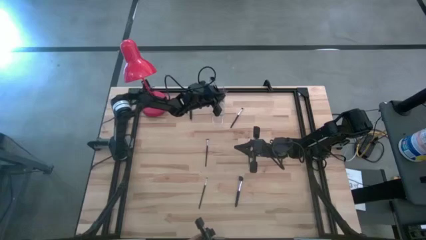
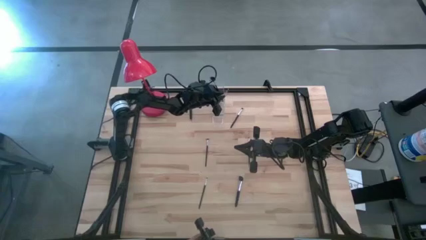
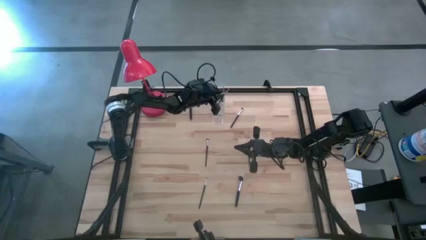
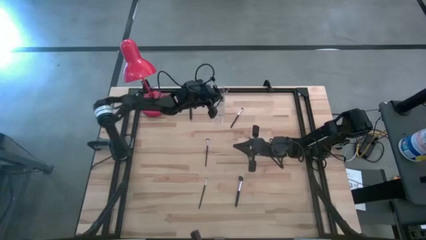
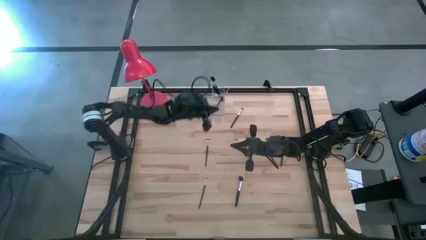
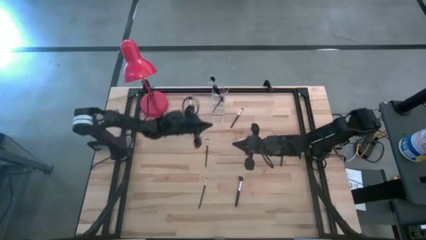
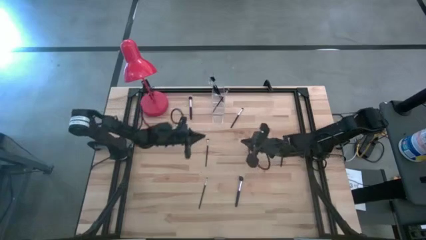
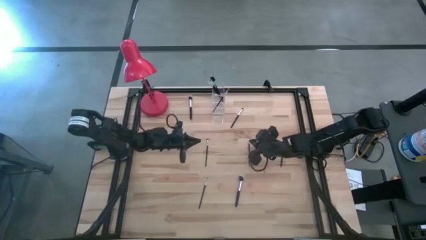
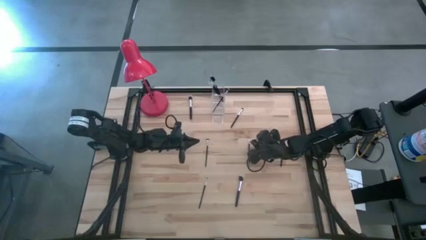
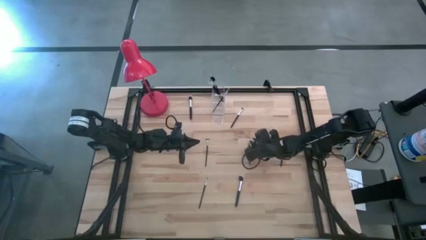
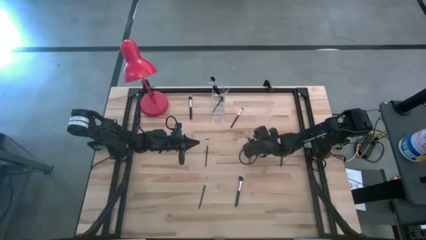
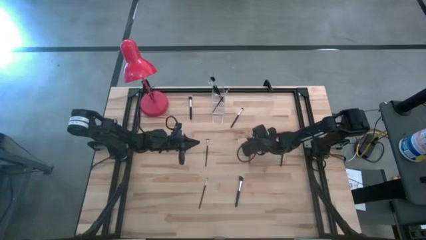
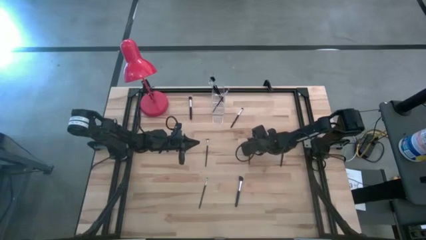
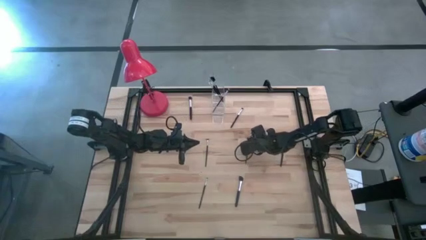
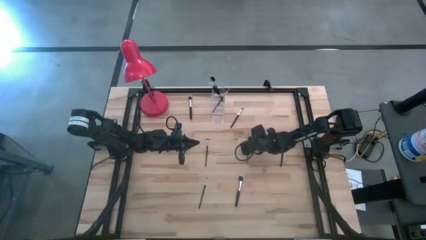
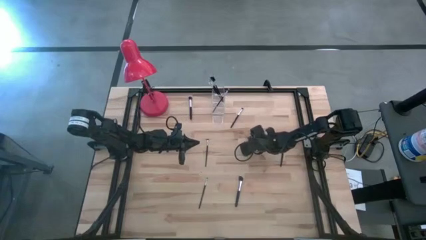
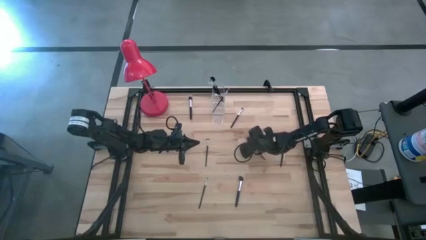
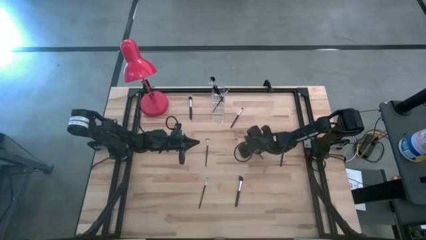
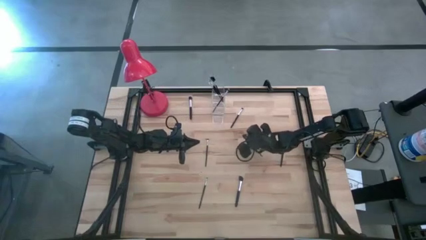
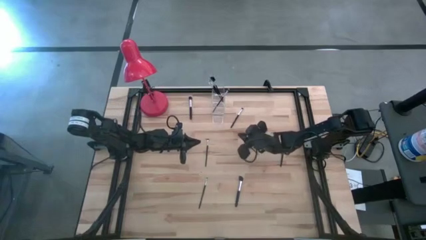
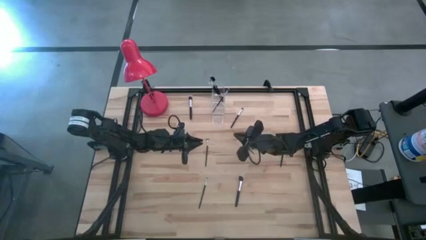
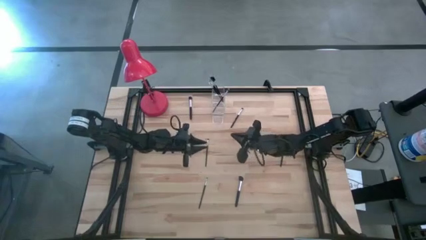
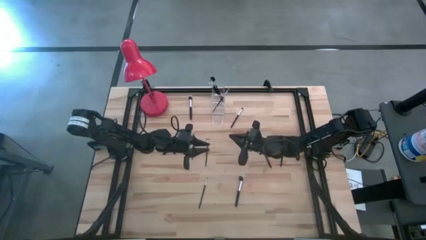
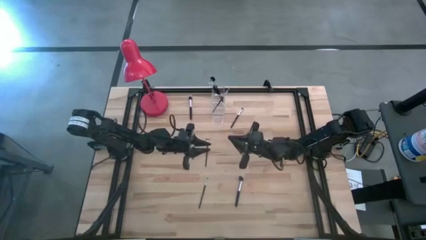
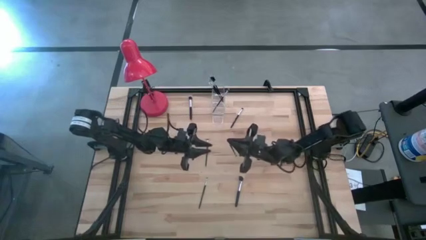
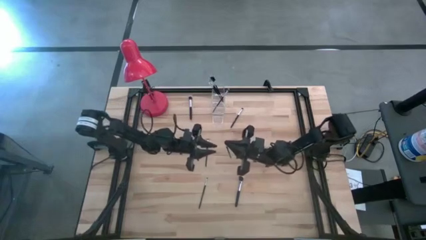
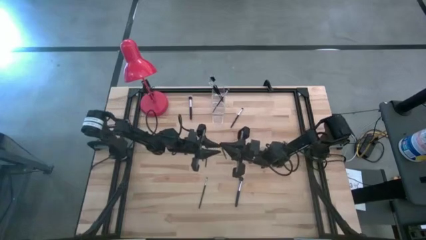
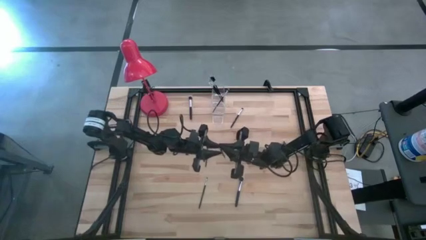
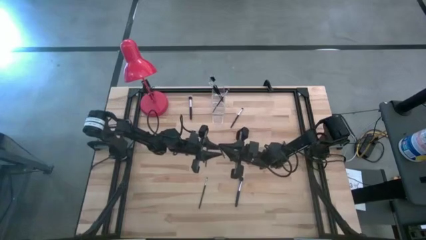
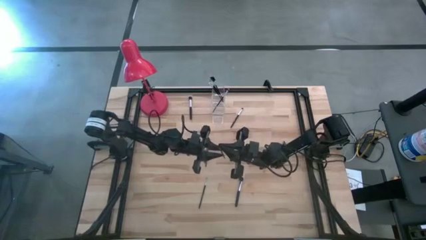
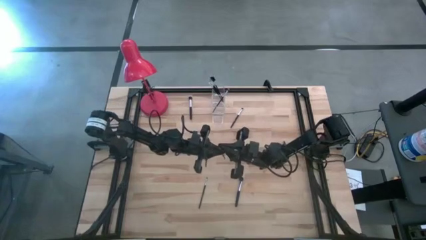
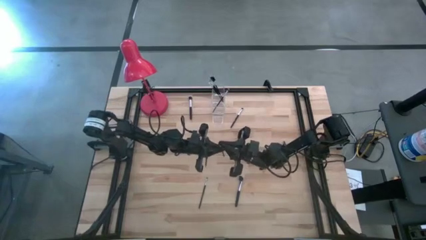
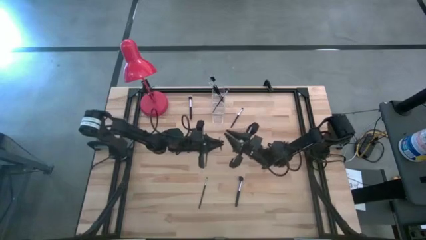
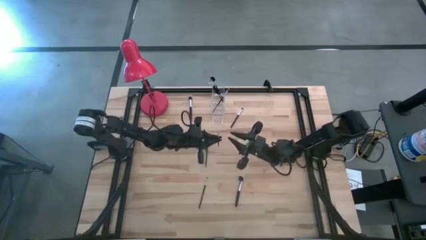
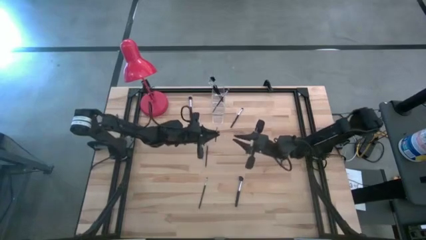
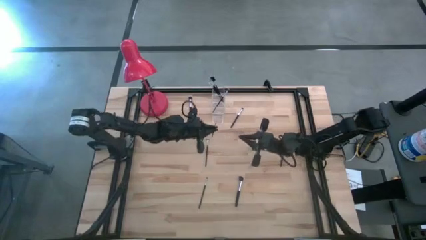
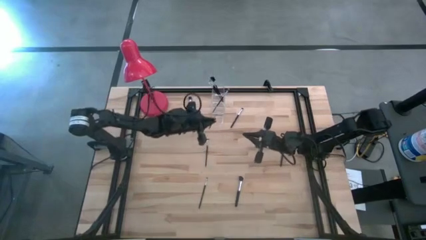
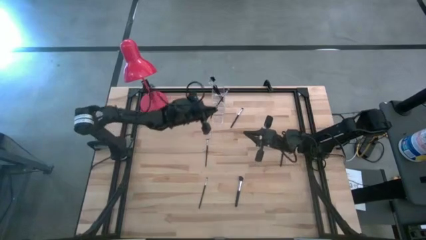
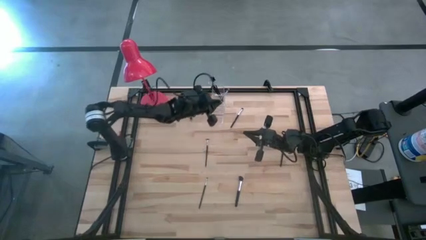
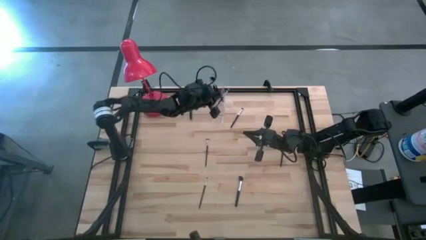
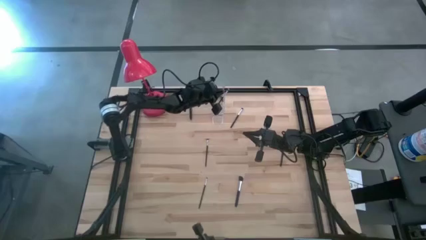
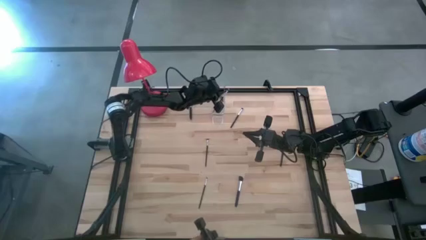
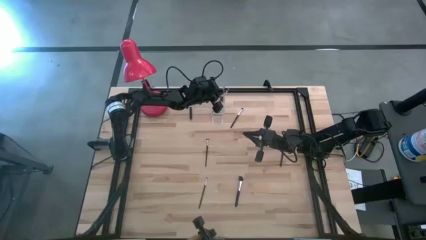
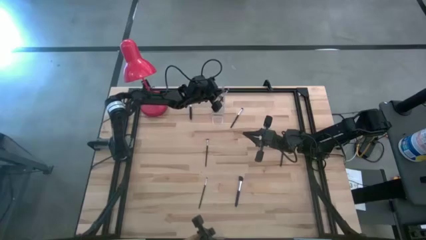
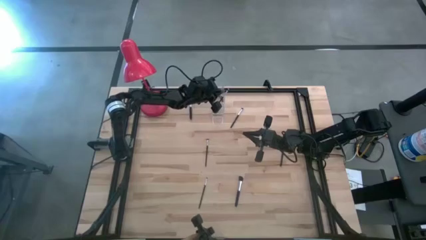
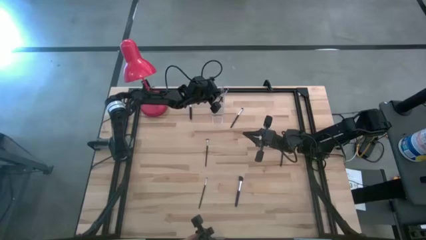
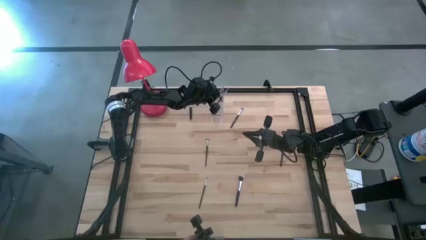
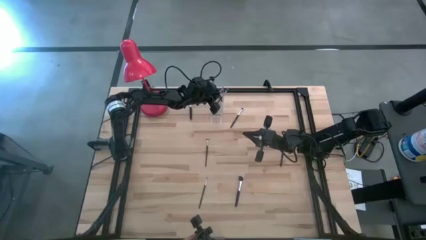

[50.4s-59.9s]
Task: Put items in baskets/containers
Put the black eyeshadow brush into the transparent organizer

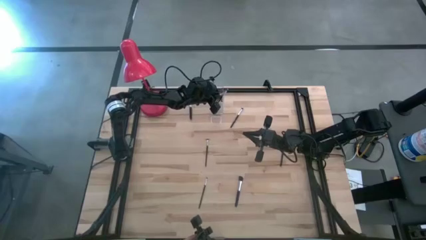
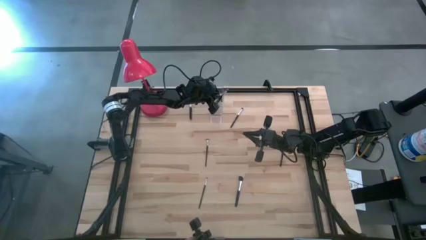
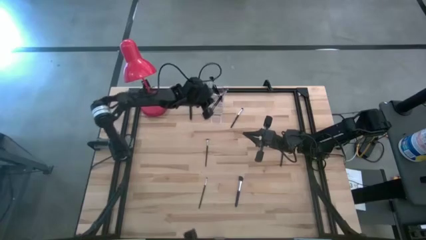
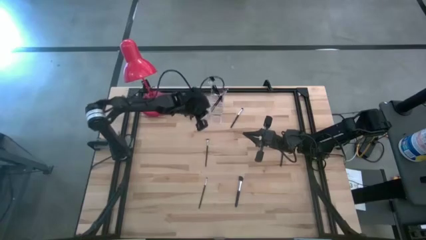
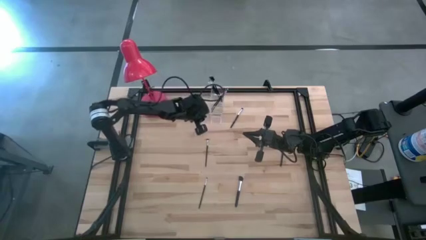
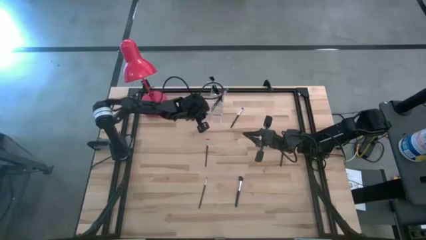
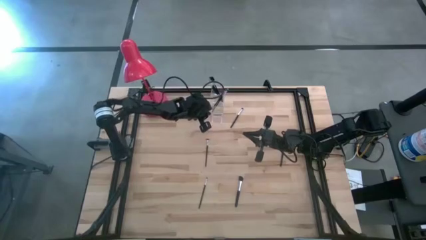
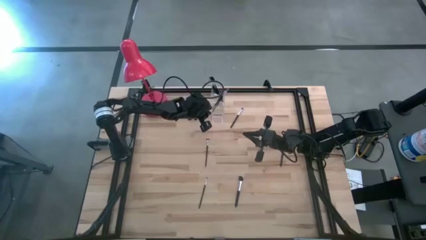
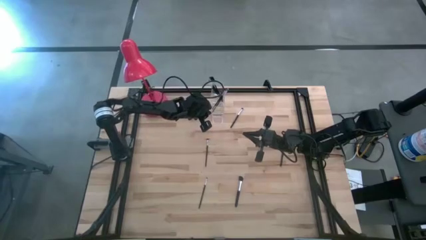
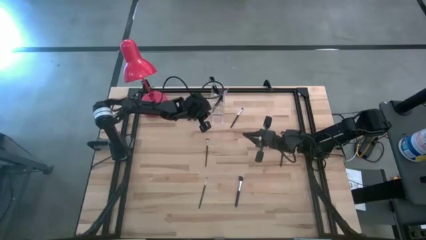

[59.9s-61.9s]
Adjust the transparent organizer on the table

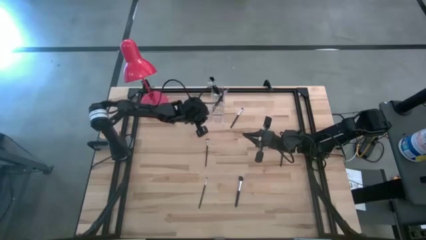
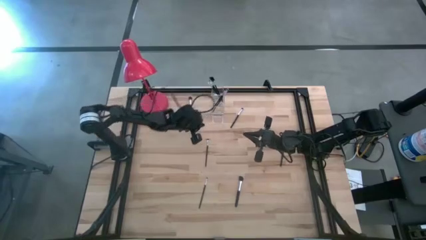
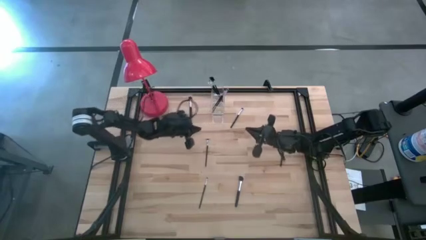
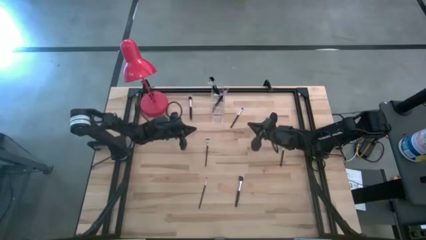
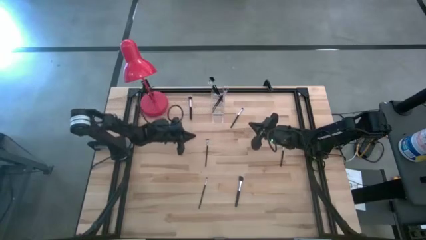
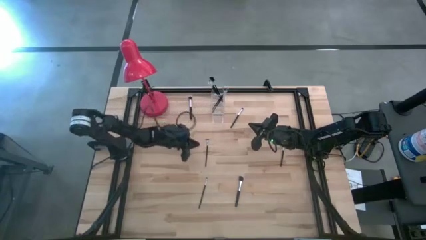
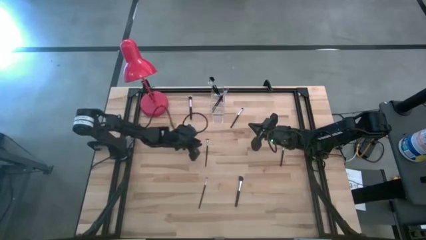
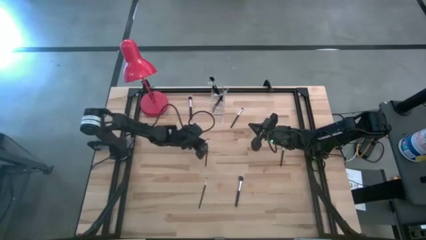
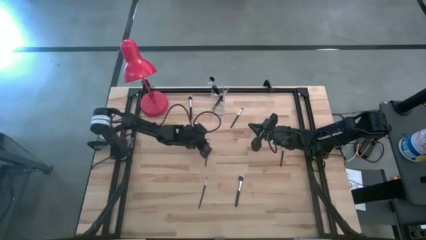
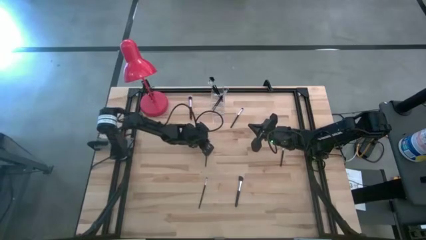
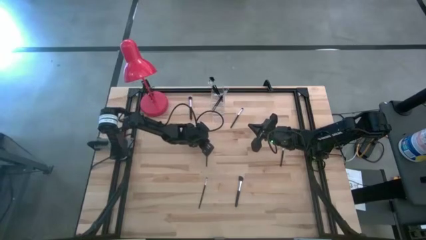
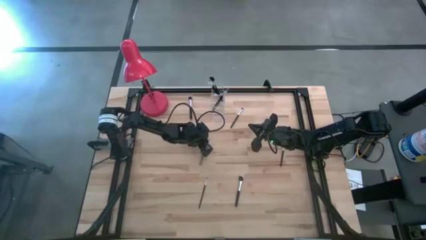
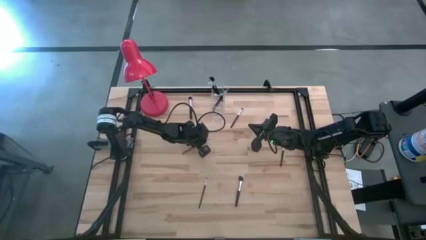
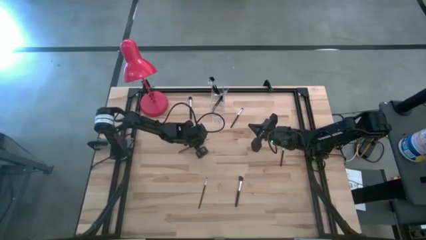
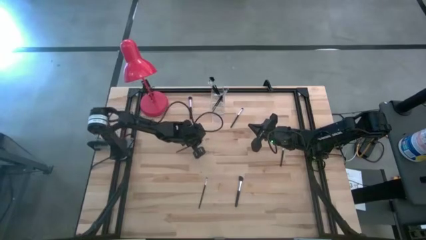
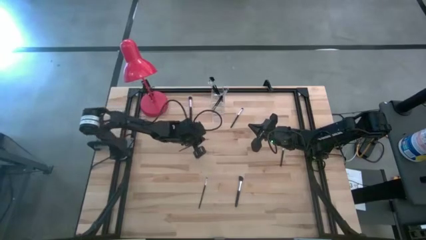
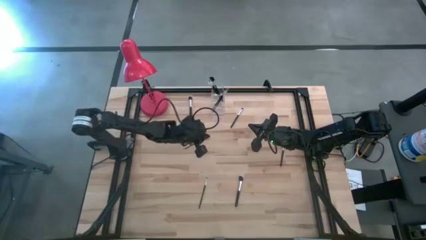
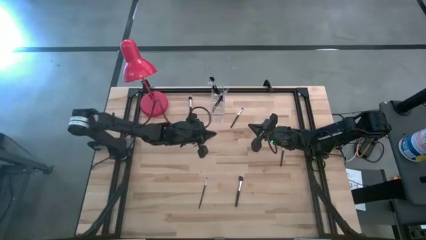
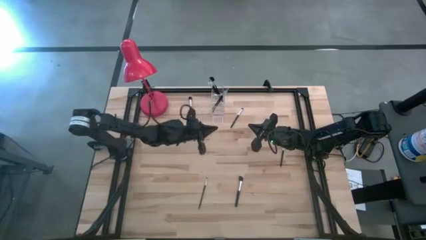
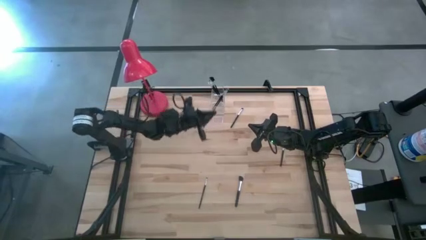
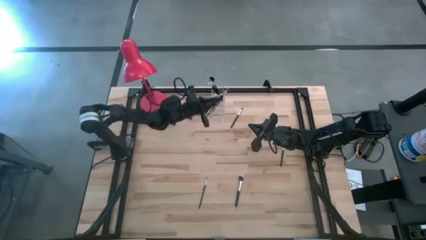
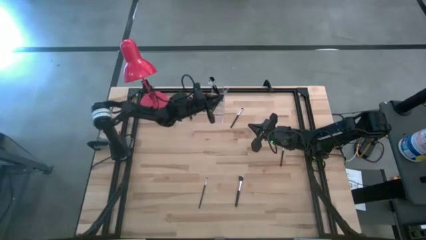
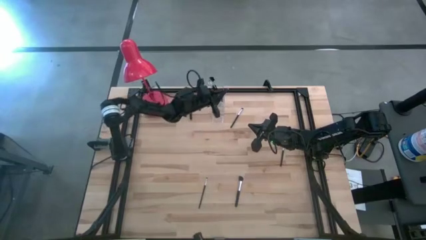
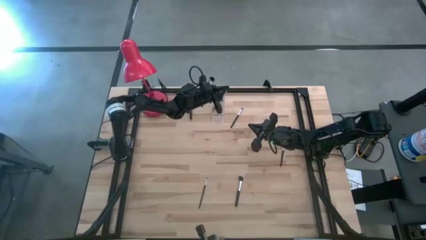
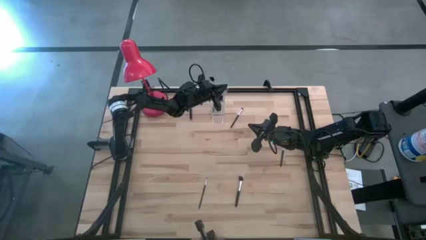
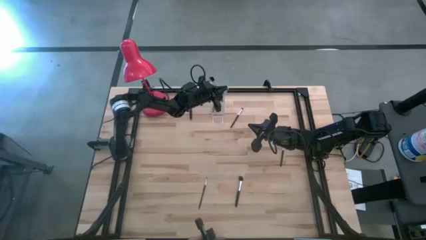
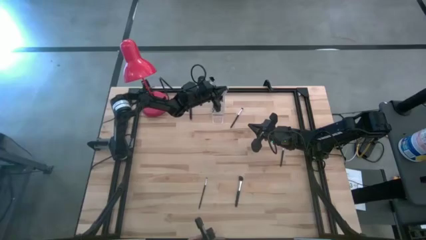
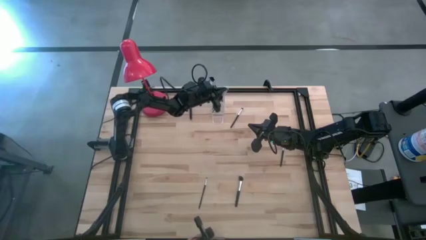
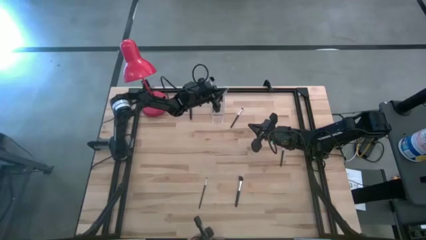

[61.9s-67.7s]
Put the black eyeshadow brush into the transparent organizer
